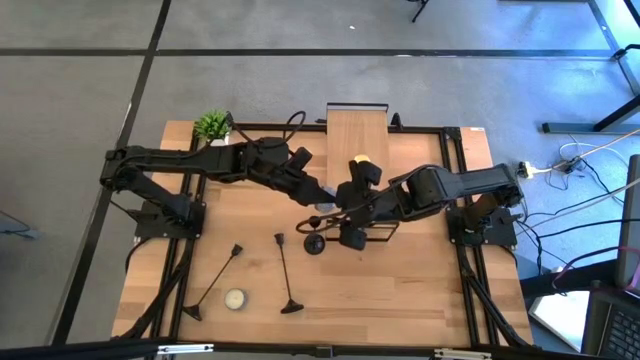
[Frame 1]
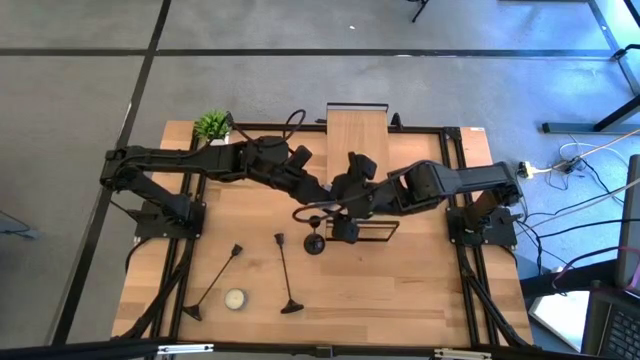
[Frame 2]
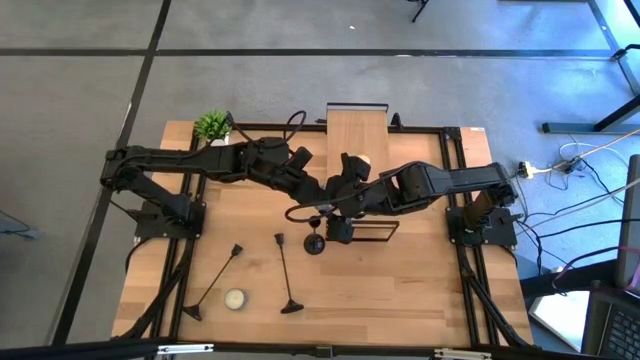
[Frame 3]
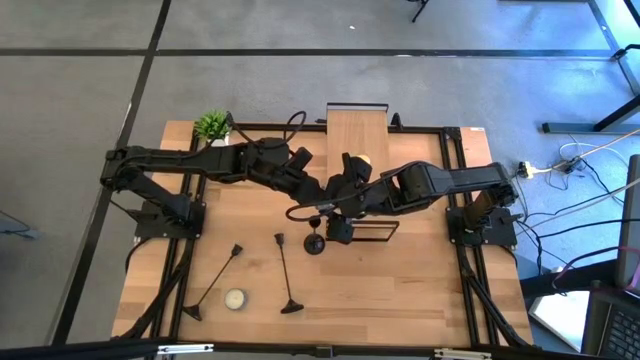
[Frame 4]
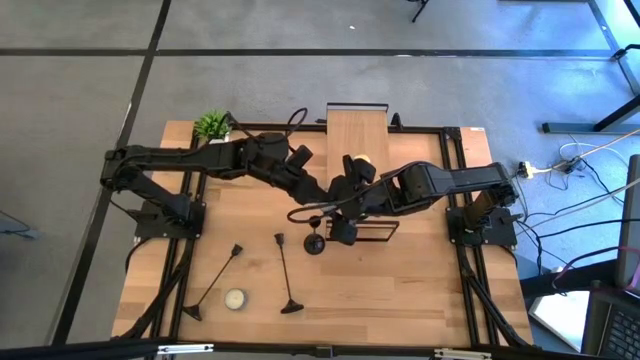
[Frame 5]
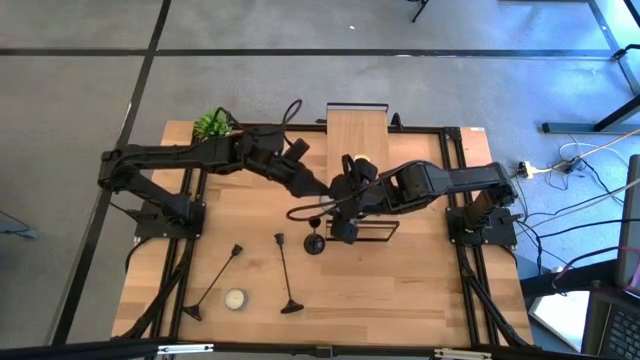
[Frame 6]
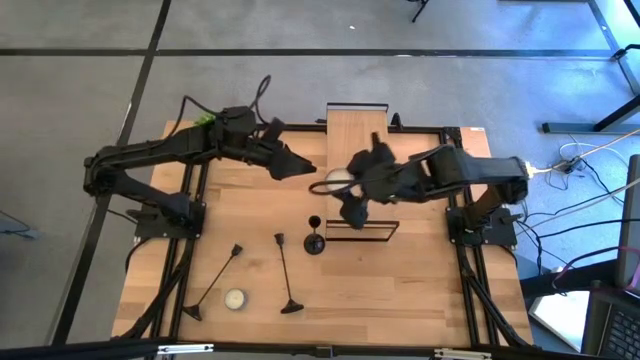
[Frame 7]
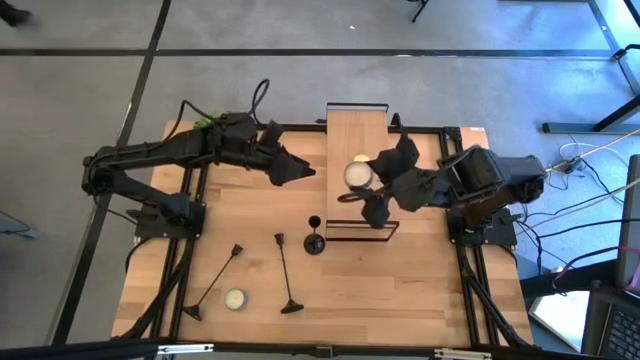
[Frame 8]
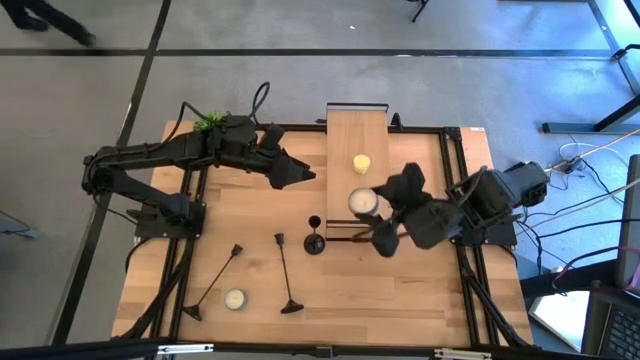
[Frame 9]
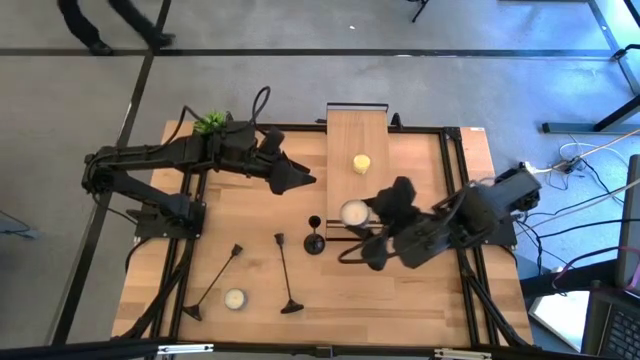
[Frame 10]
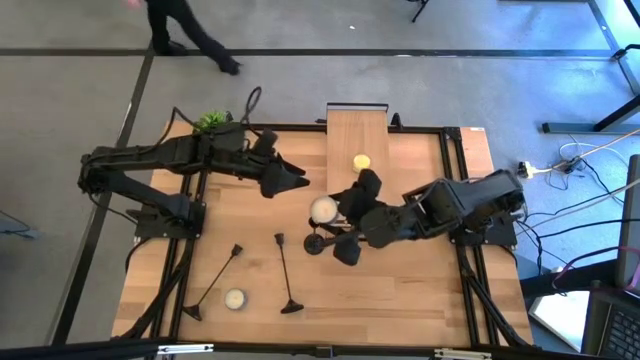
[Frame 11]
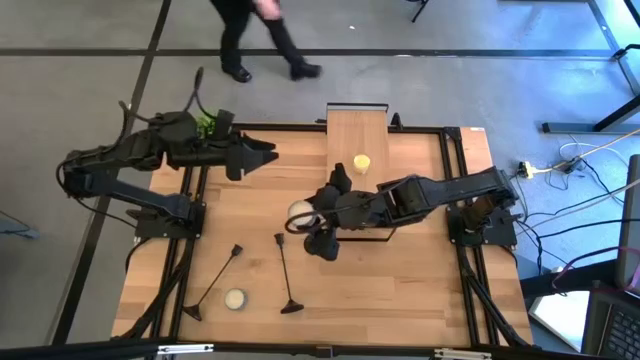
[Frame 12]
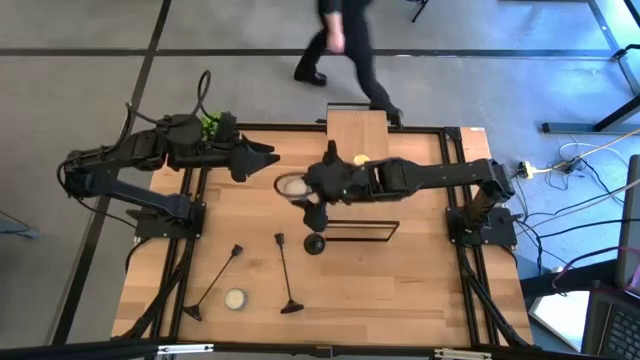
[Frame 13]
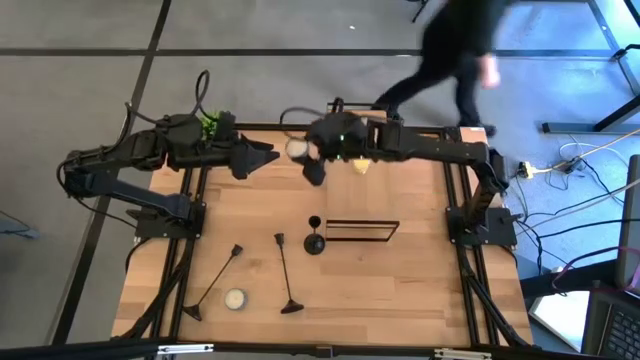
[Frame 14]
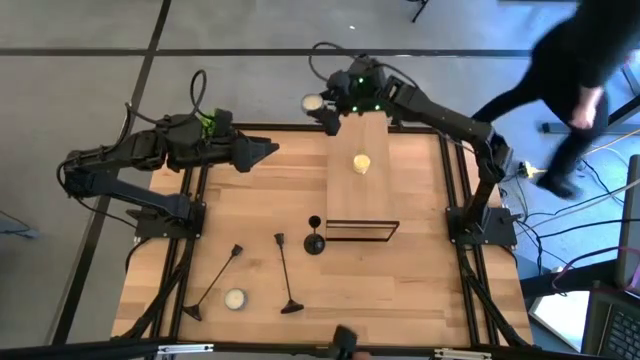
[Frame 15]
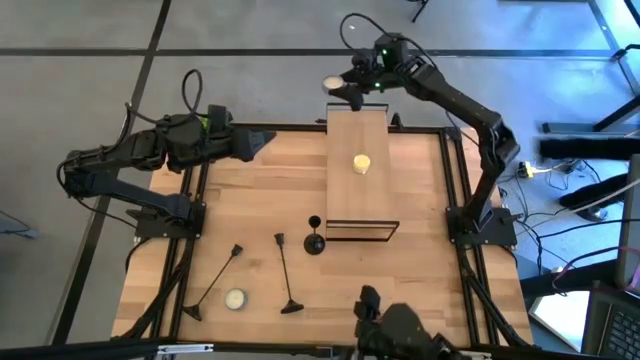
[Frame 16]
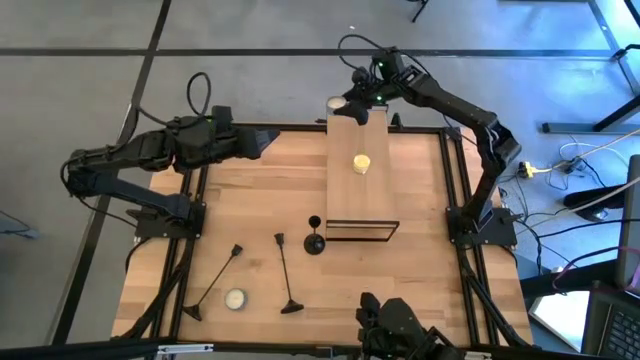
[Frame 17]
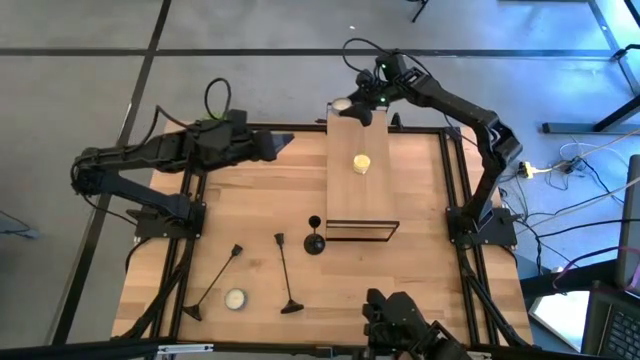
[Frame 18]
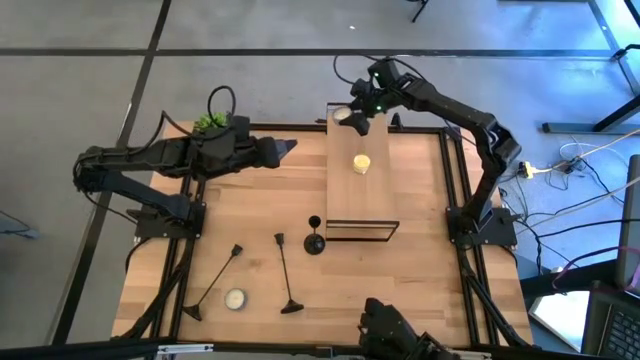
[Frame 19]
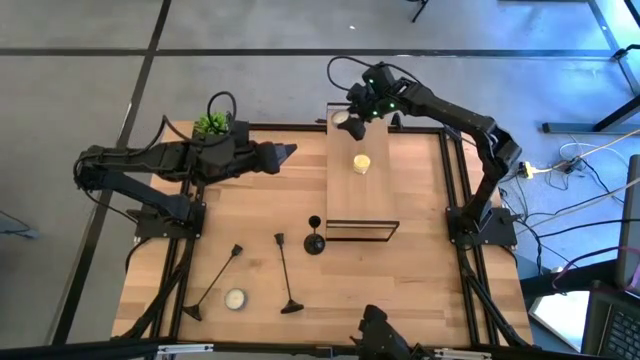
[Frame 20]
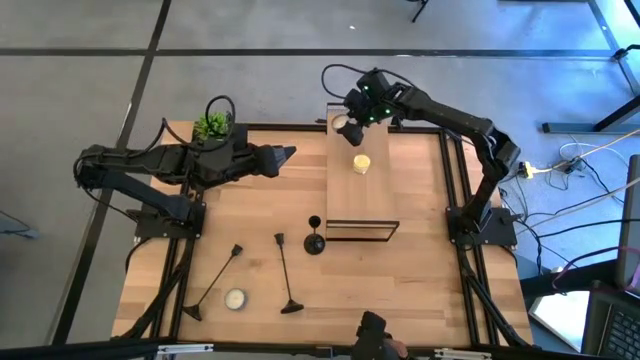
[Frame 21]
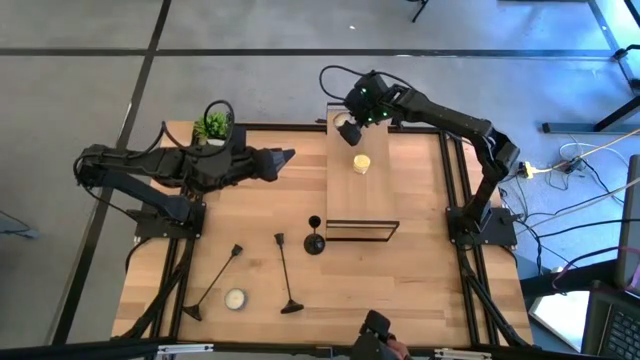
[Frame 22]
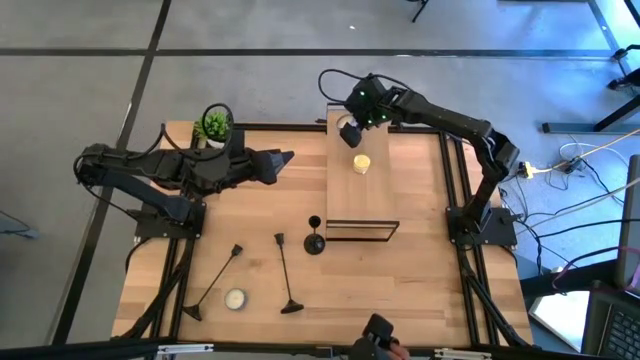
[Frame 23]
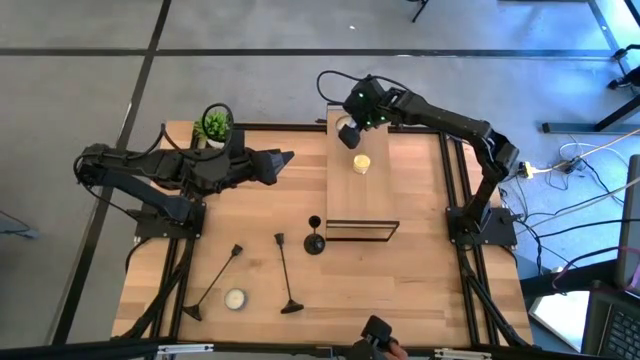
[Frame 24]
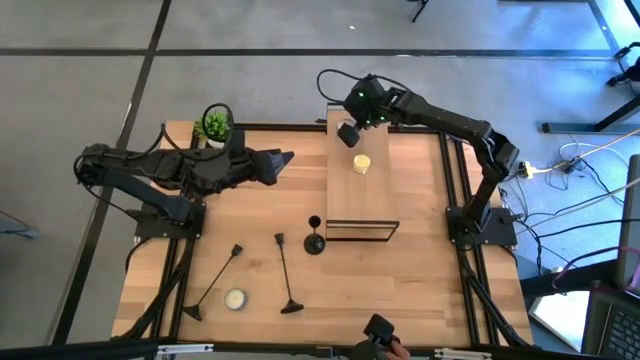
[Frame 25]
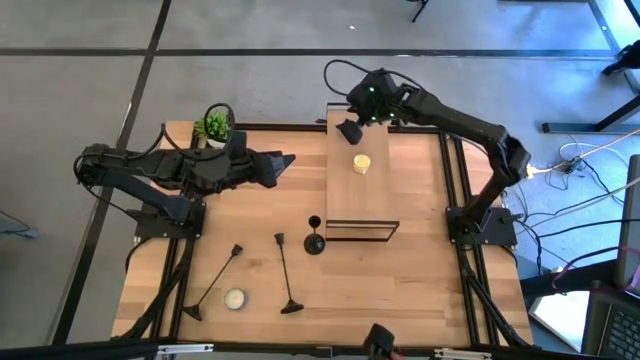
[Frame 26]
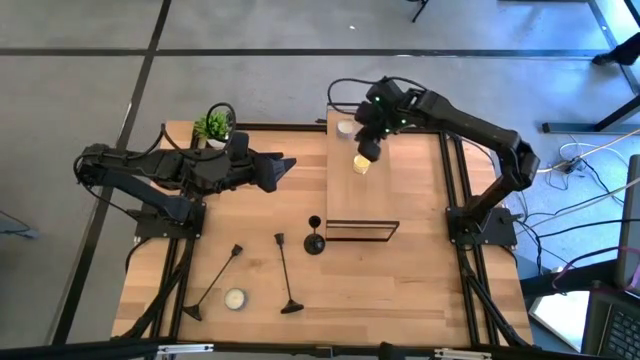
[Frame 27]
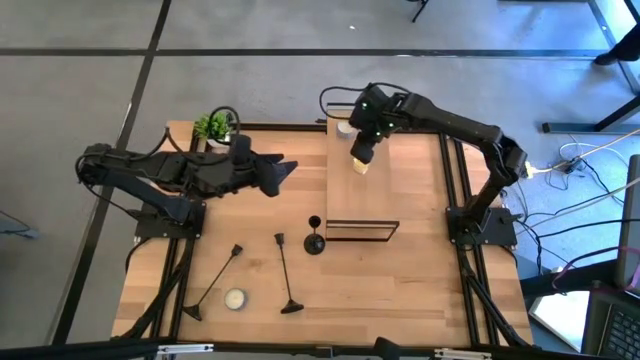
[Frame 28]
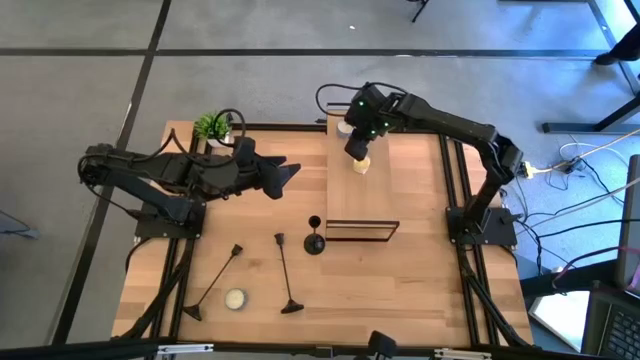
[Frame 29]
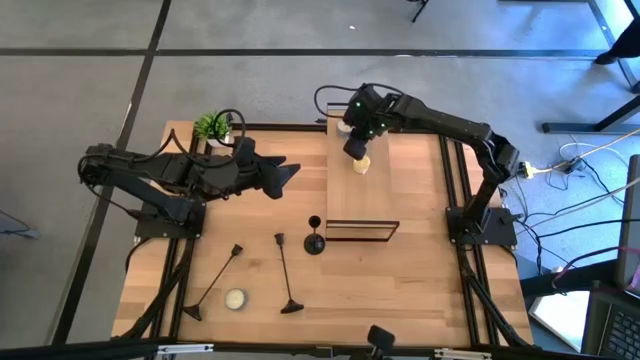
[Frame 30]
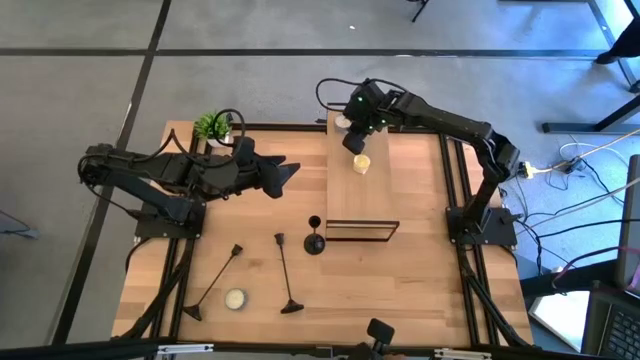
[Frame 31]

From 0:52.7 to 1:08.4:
Task: Pick & Place candle stick holders
Put the top blue jar candle in the top left corner of the shelf

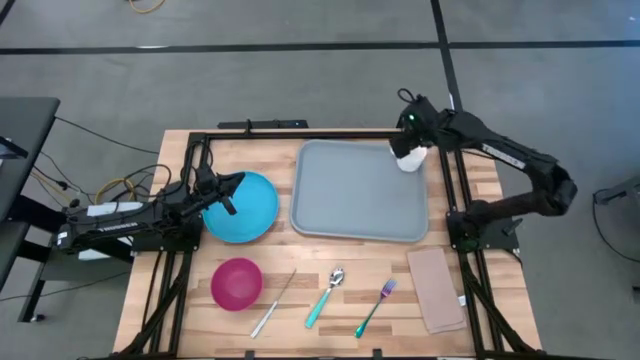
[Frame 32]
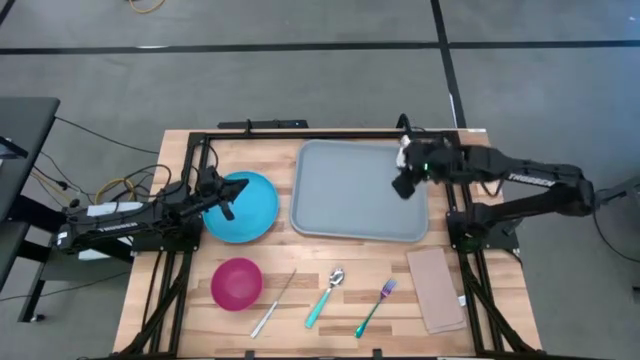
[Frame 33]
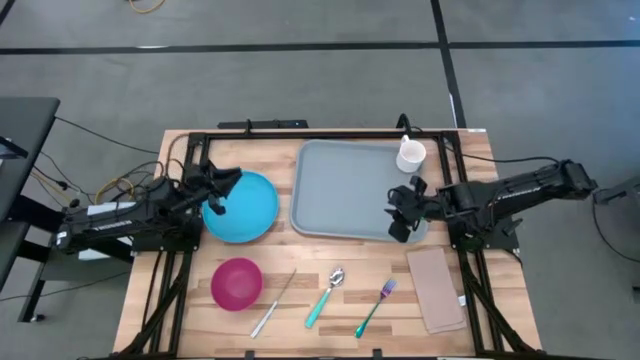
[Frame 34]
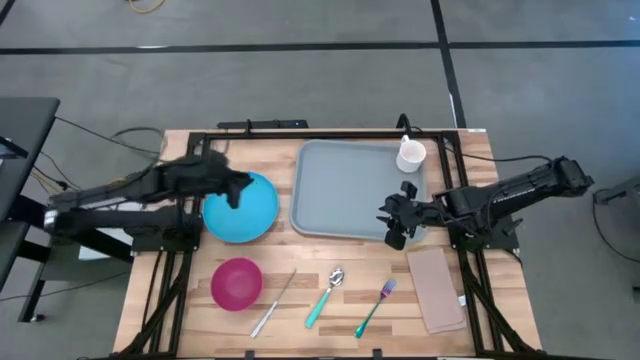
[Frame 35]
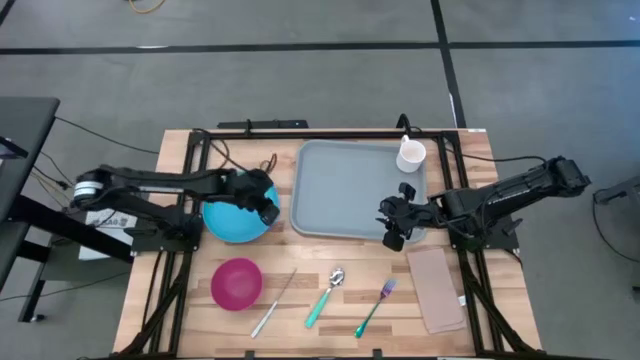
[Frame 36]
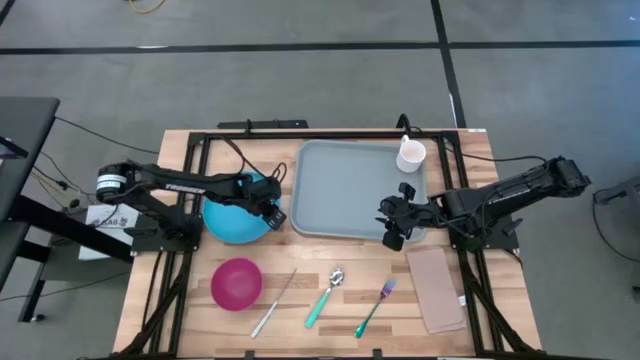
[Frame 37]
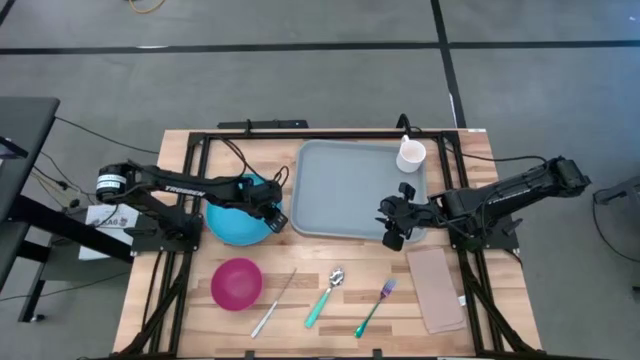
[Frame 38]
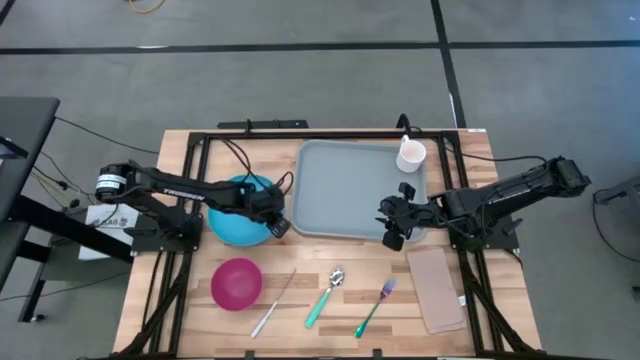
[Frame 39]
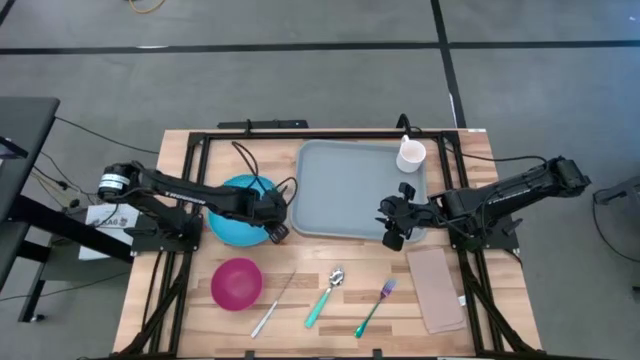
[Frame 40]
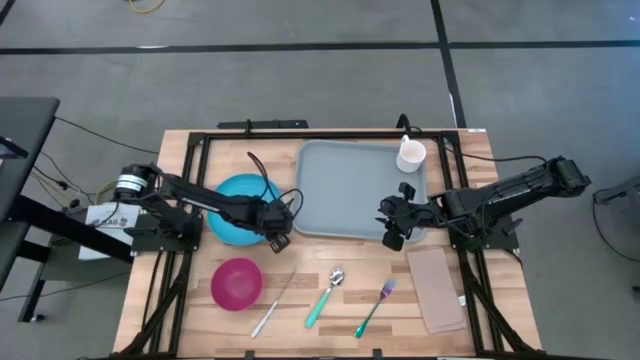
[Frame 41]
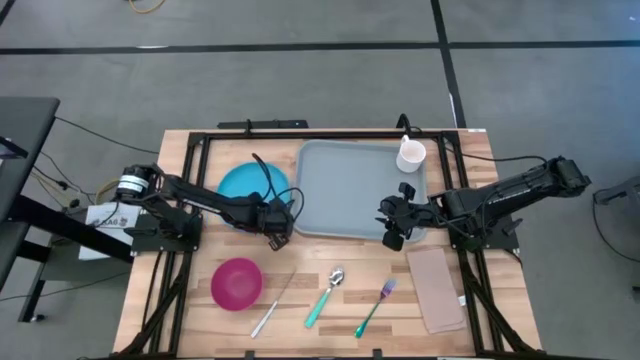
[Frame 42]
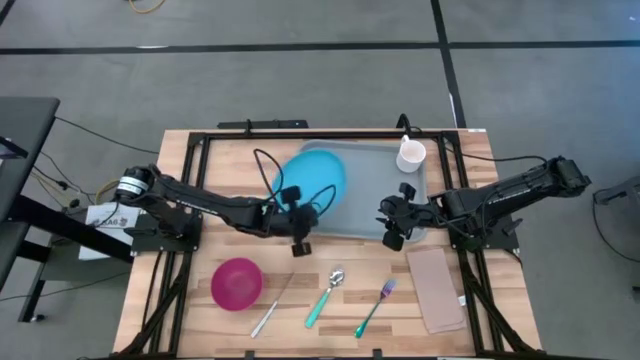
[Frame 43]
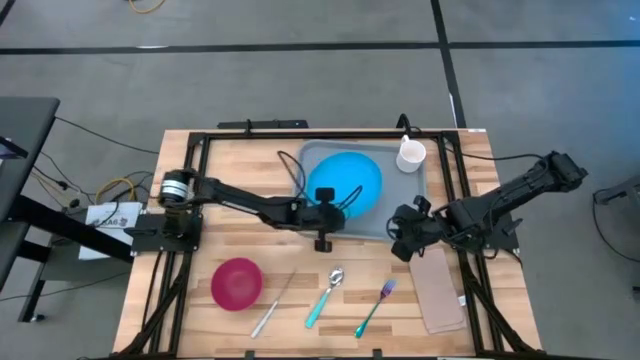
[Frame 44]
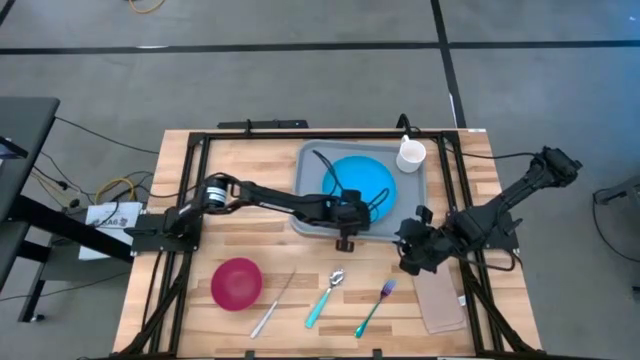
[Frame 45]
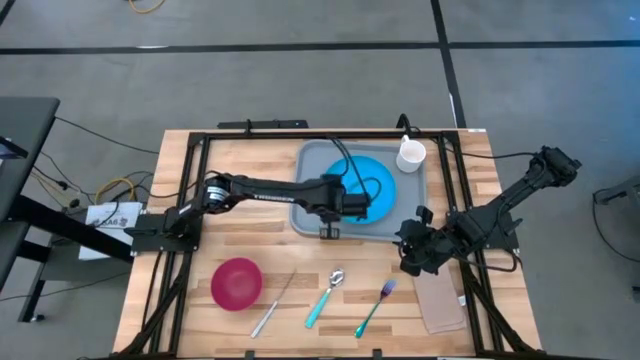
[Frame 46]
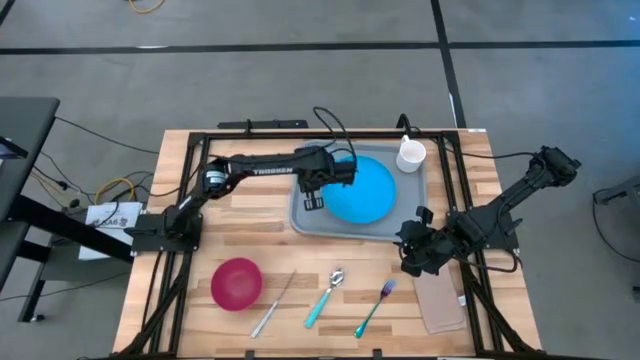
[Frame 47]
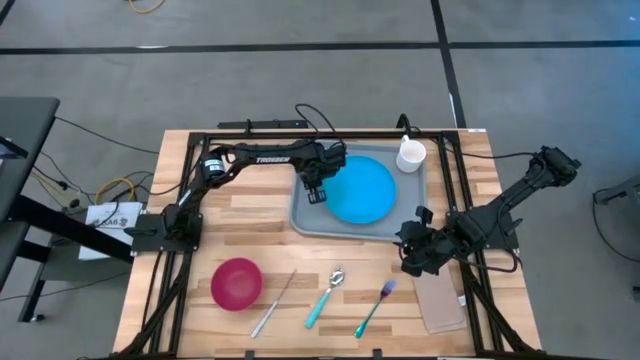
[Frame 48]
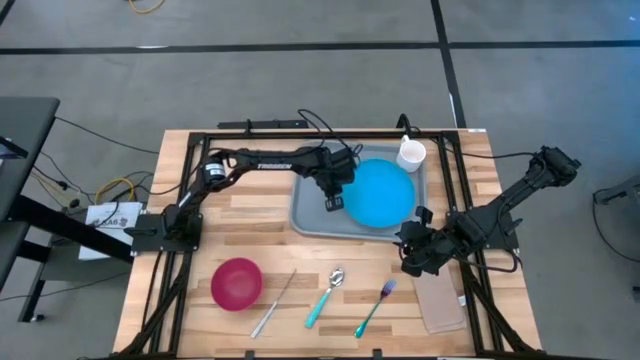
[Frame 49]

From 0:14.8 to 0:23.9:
Task: Set up tray
Put the blue plate to the bottom of the white mug on the gray serving tray
